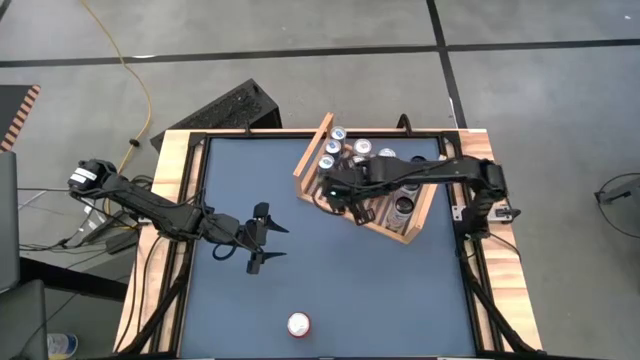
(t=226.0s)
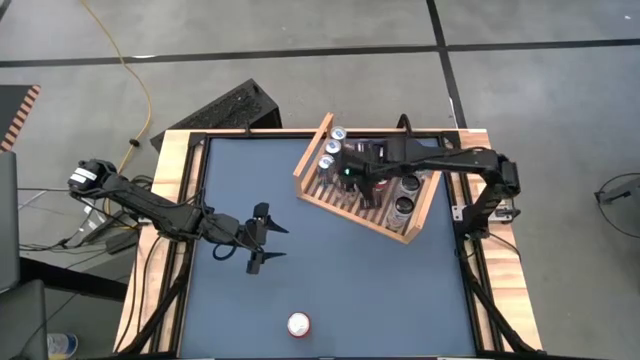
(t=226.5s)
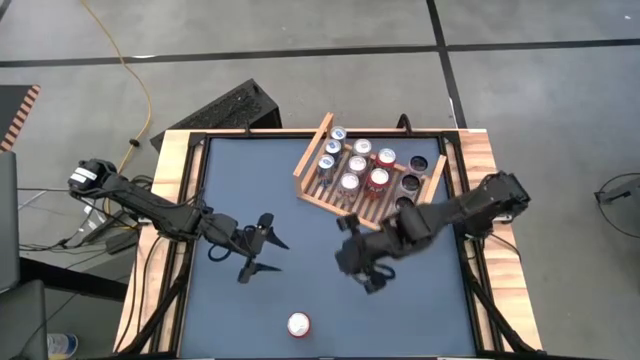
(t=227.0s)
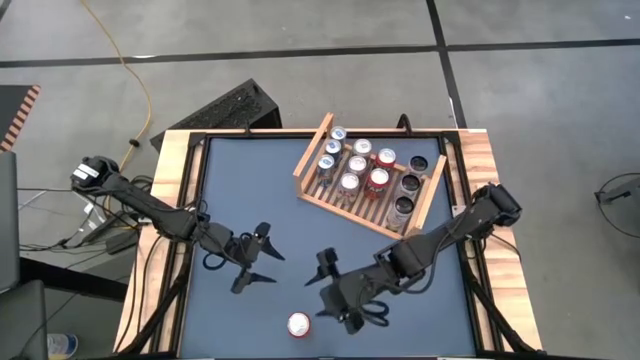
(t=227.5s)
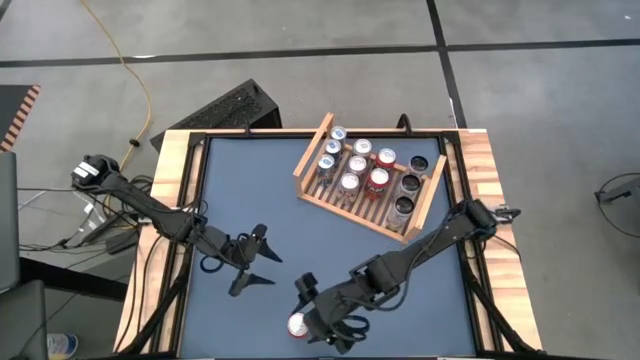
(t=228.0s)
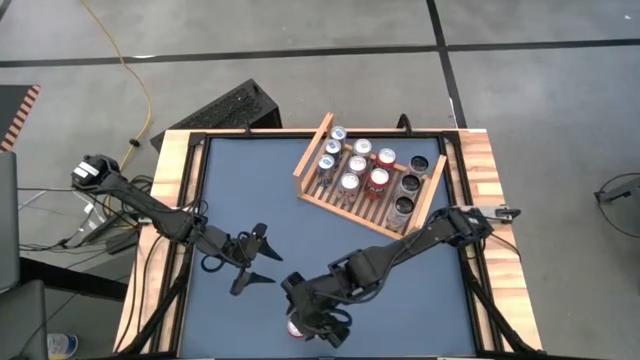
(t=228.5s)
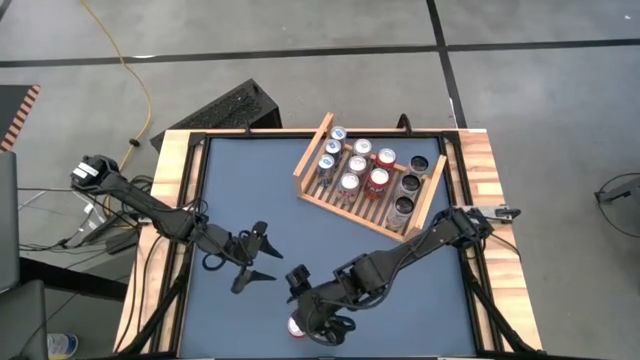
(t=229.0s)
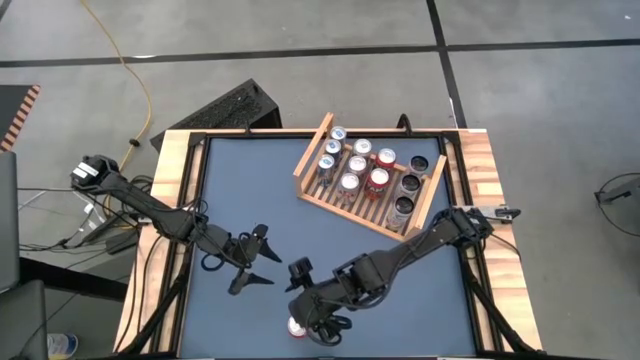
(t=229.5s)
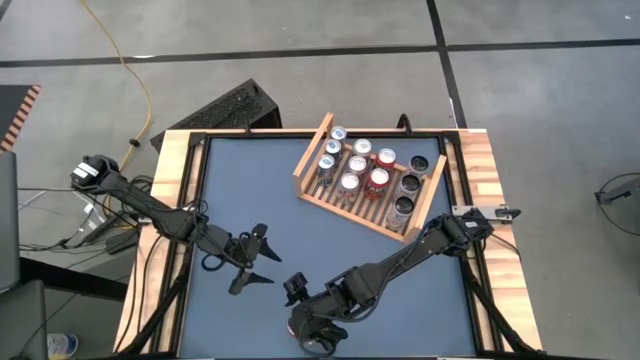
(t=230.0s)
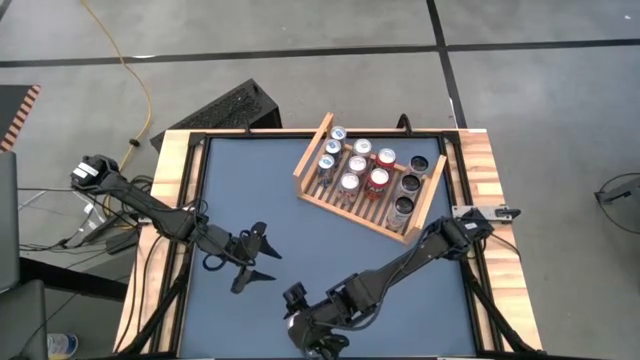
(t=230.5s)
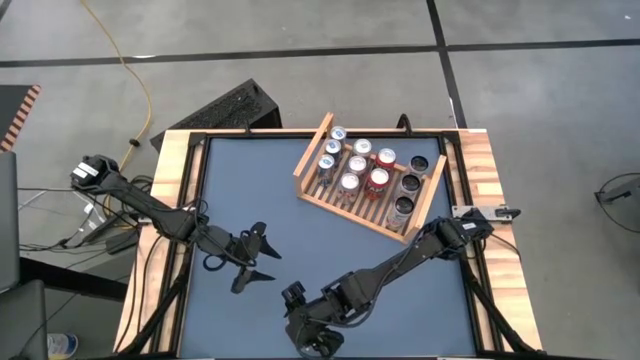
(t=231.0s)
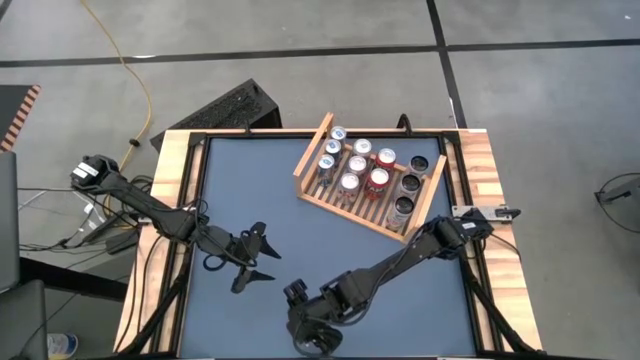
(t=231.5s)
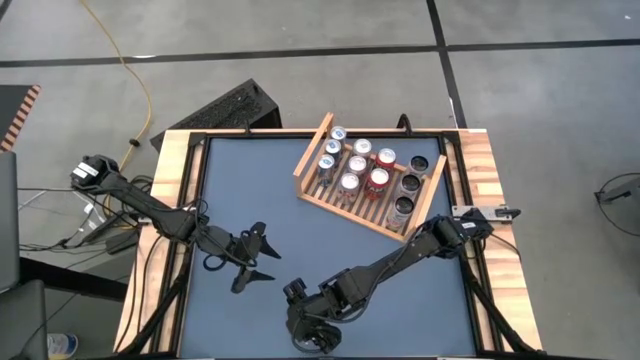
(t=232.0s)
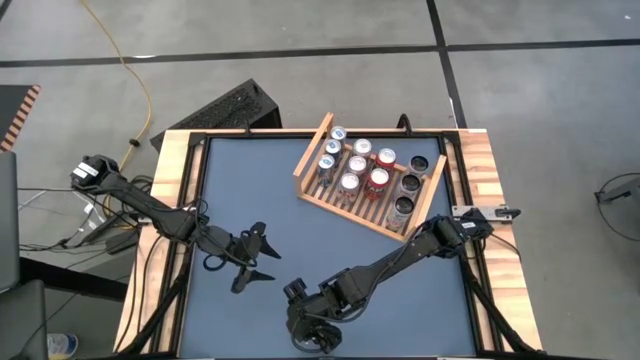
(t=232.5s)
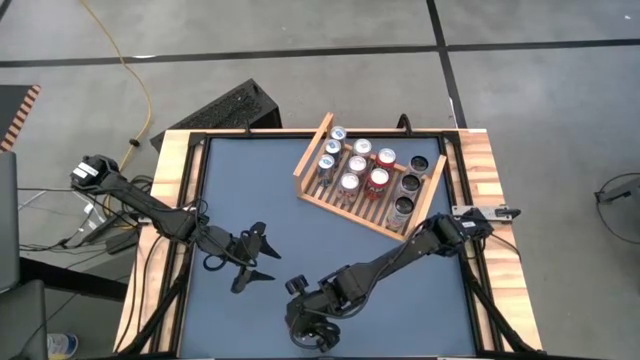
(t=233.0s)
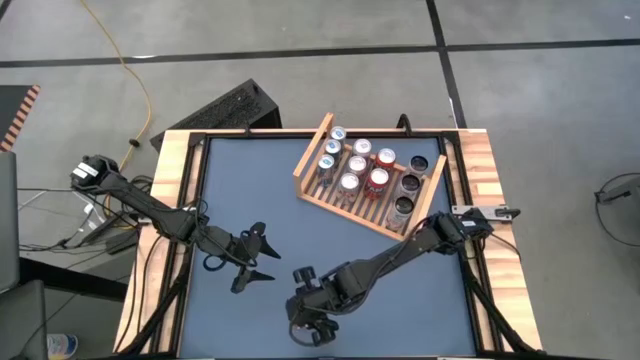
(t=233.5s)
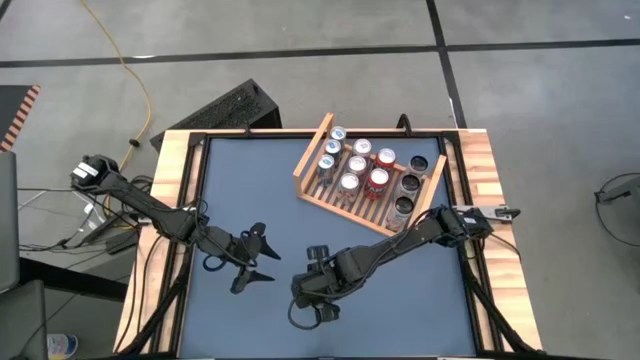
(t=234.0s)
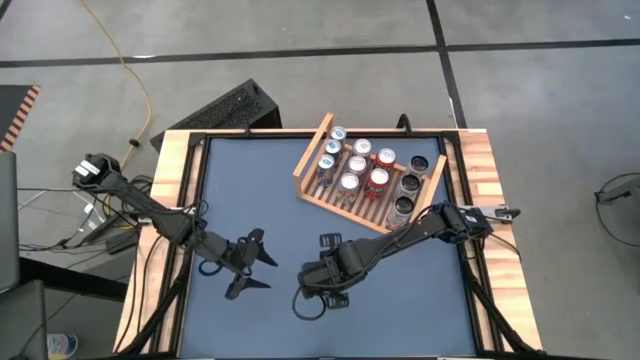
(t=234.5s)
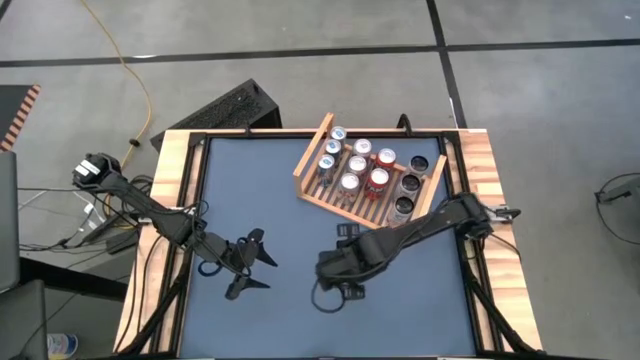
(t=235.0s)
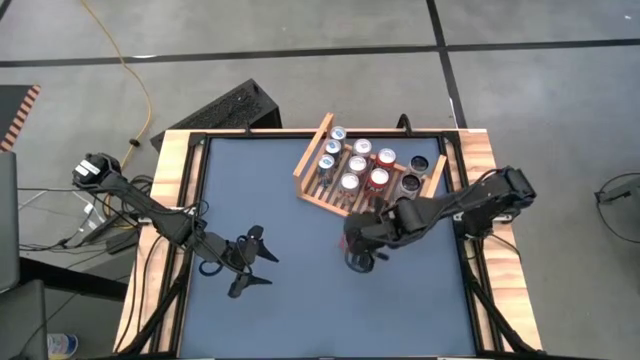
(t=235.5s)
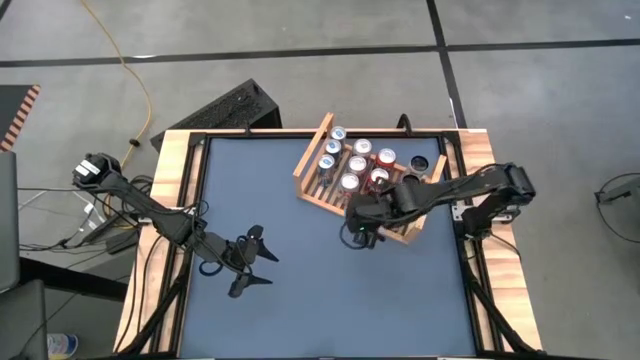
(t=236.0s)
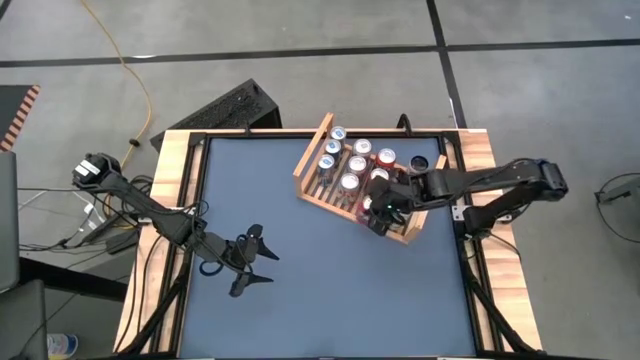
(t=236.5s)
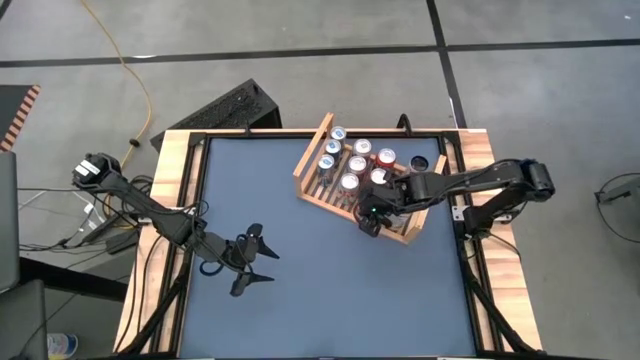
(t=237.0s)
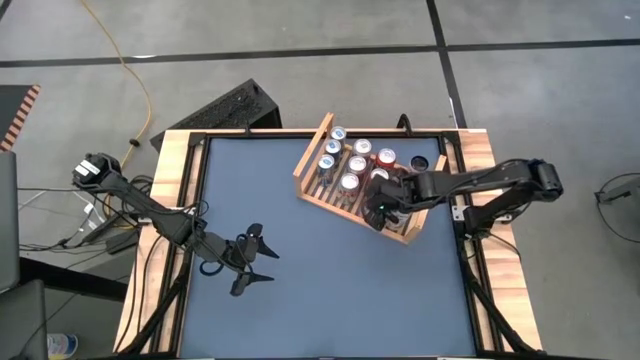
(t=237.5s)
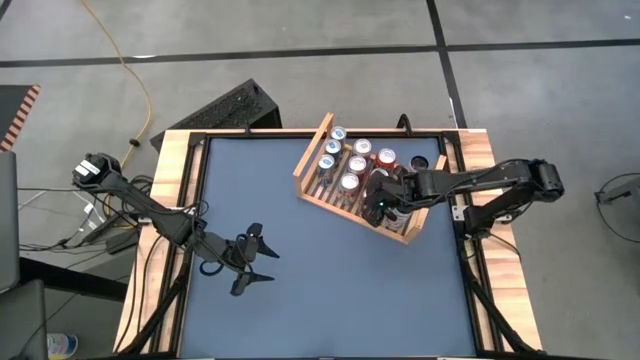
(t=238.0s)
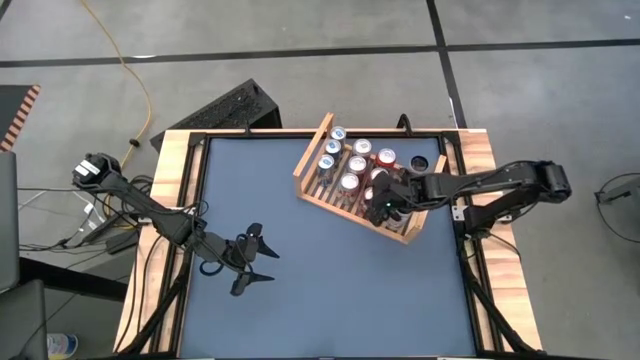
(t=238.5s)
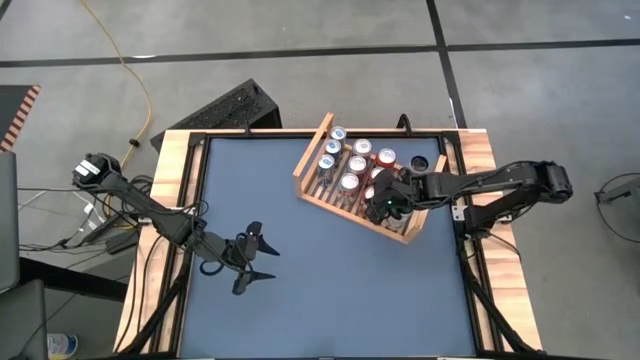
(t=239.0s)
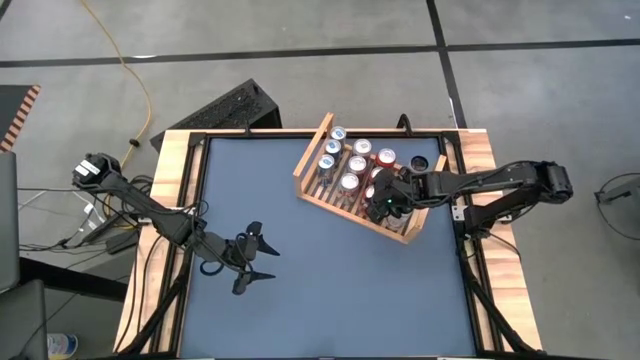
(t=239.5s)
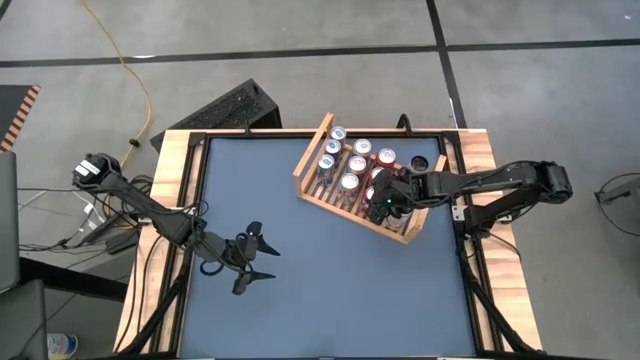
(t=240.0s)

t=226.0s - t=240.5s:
Task: Place canned beverage on shelf
Put the red soda can aligned with the other red soda cans on the shelf

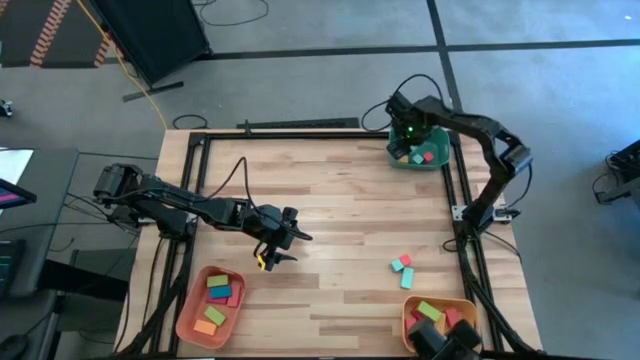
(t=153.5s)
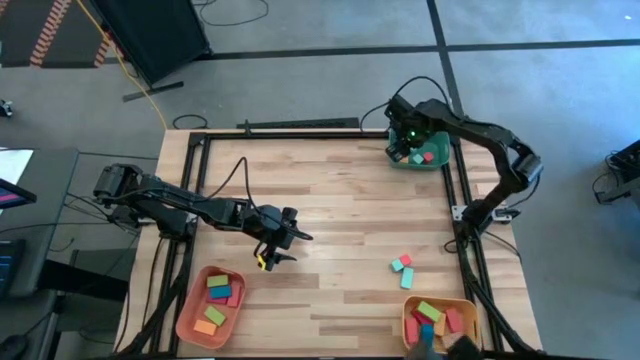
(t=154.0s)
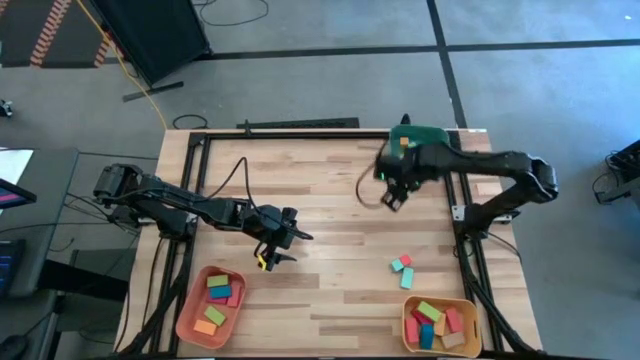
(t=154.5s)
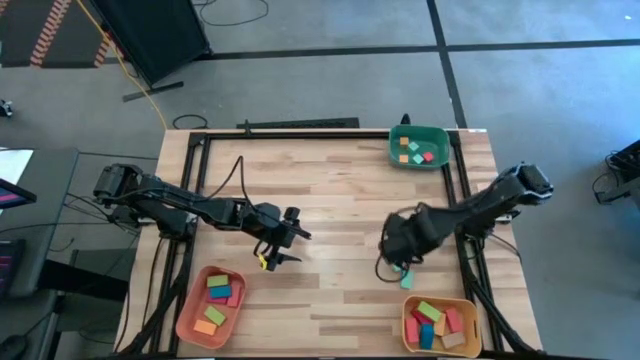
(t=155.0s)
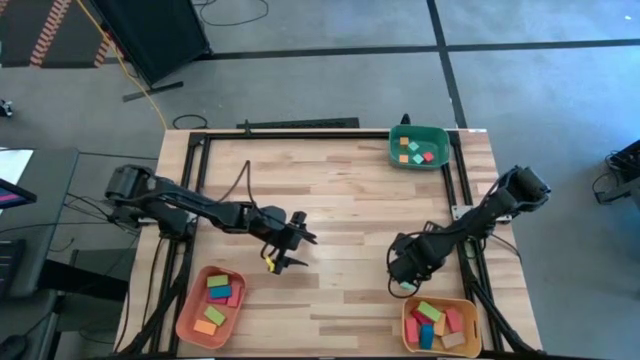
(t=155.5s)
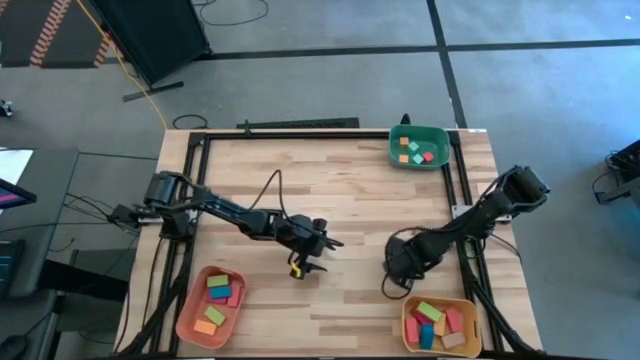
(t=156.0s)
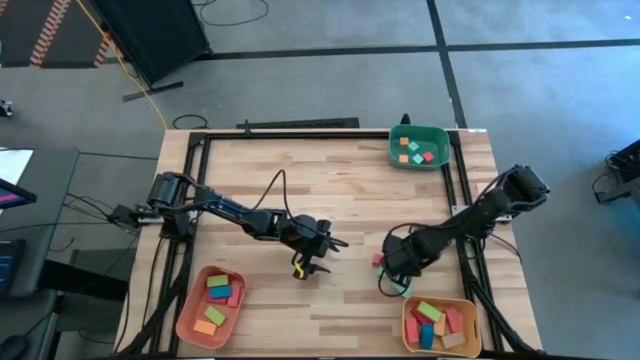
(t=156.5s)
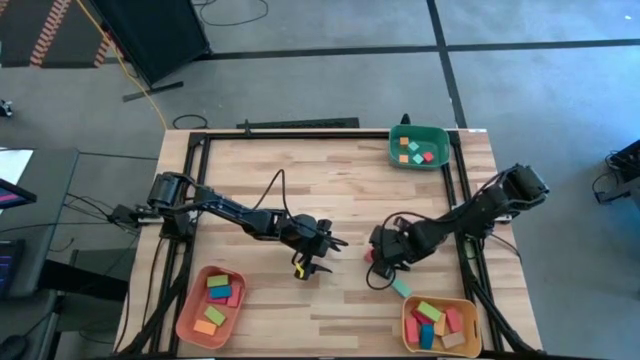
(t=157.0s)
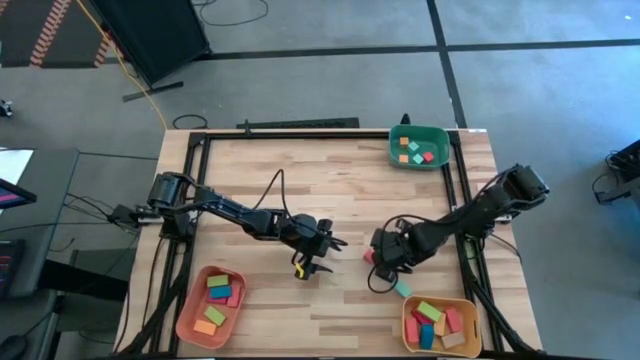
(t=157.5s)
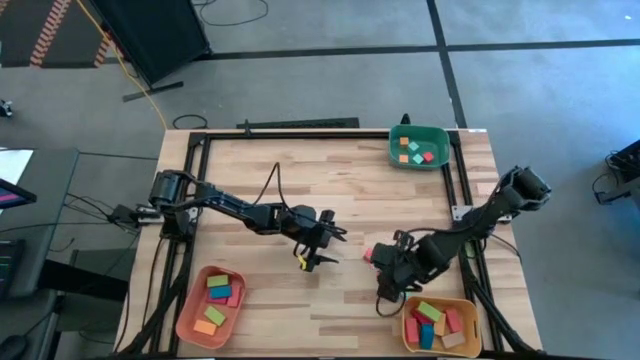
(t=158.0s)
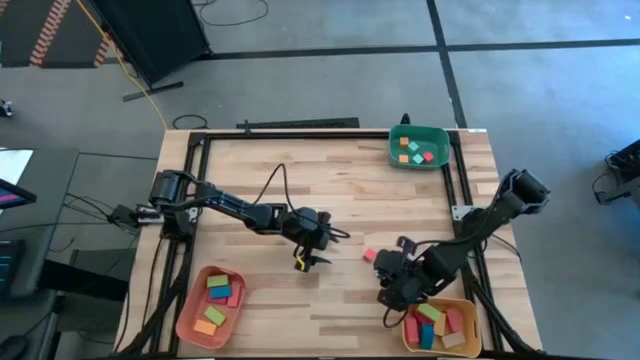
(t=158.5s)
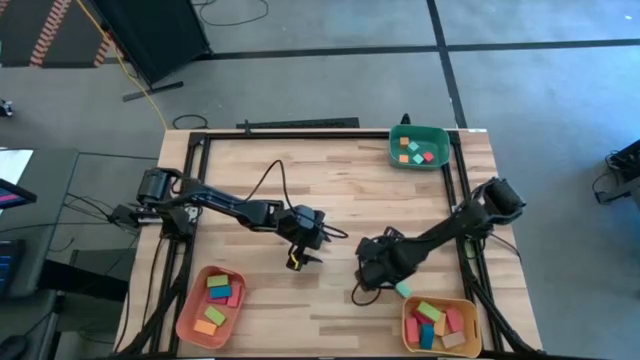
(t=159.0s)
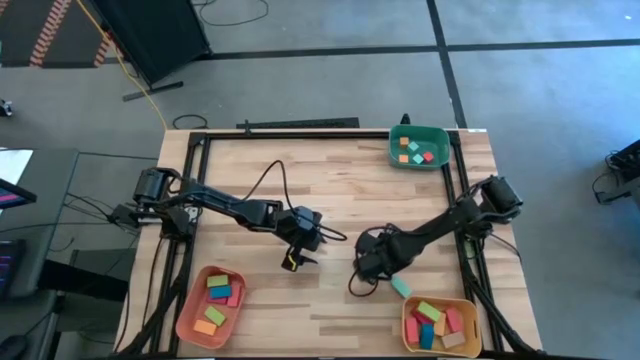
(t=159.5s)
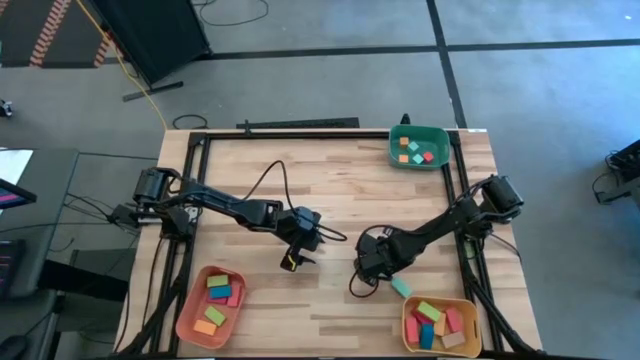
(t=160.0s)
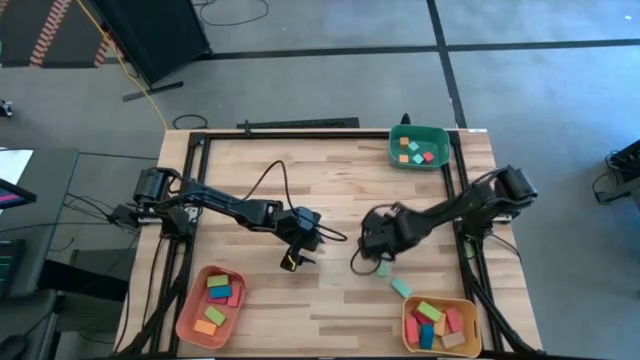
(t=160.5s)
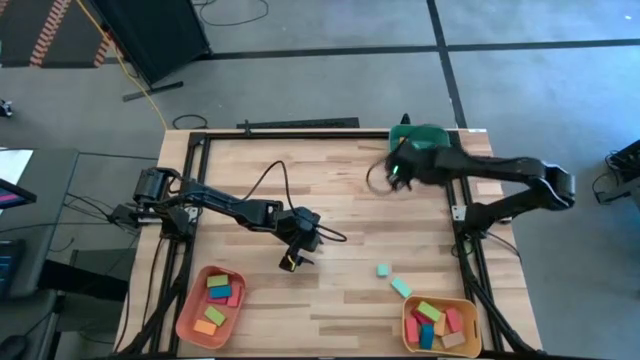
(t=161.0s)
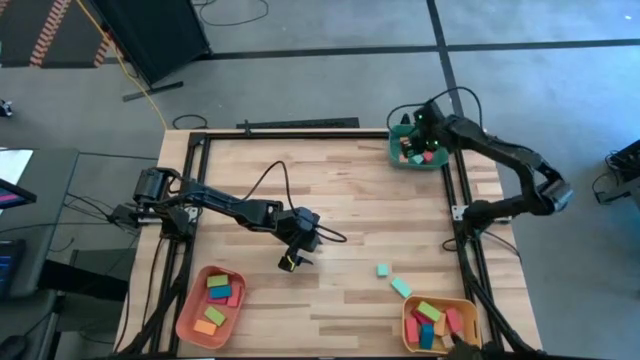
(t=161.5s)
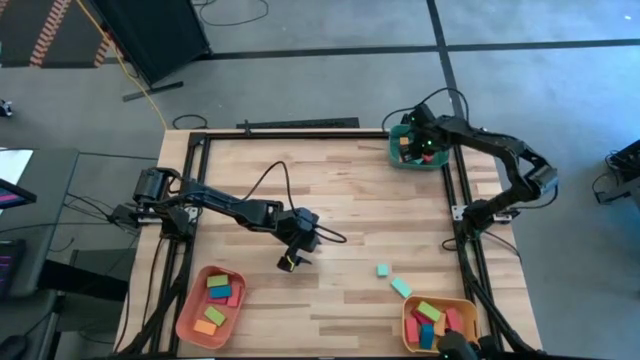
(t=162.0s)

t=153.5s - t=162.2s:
Task: Sort blocks by size
Put the small orange square block into the blue bin
